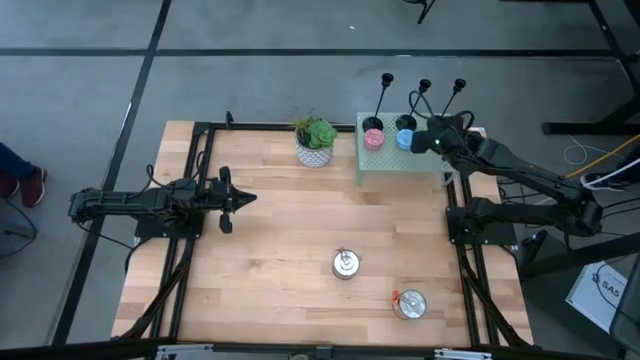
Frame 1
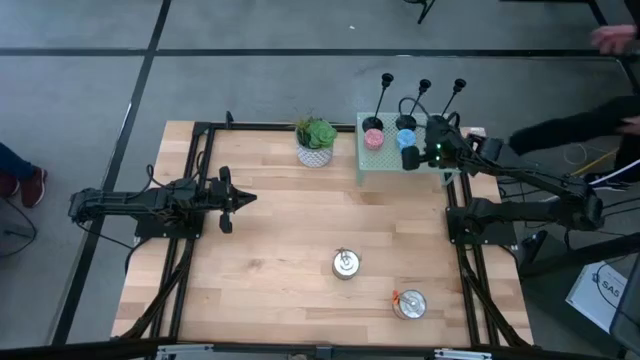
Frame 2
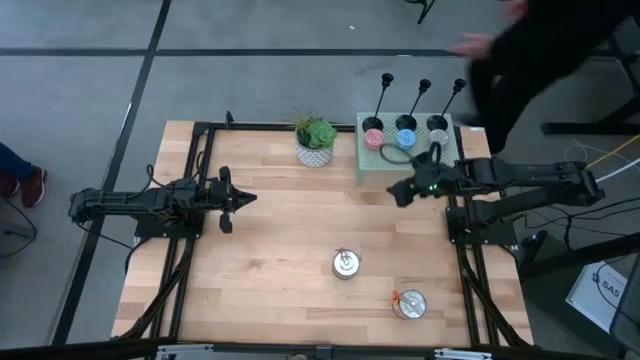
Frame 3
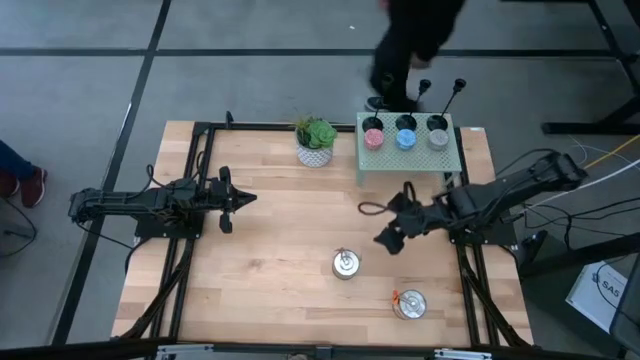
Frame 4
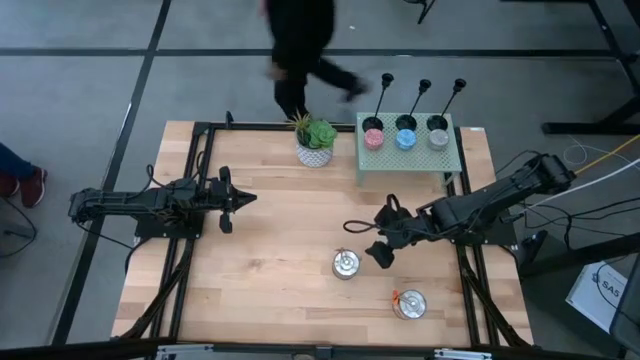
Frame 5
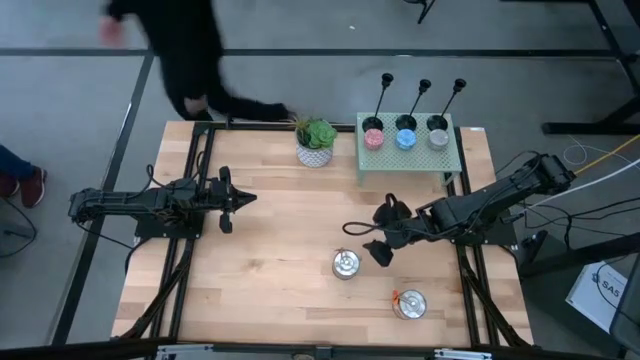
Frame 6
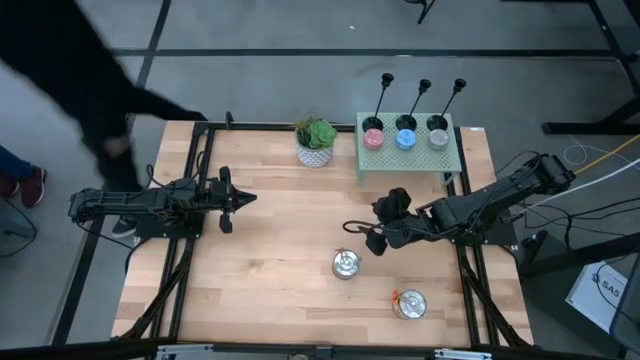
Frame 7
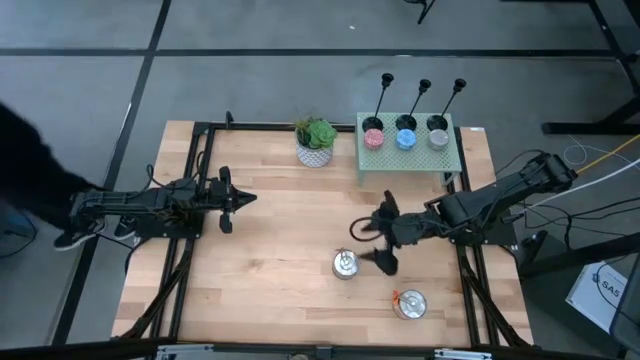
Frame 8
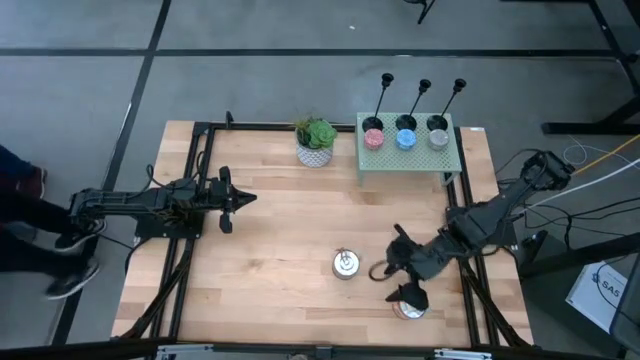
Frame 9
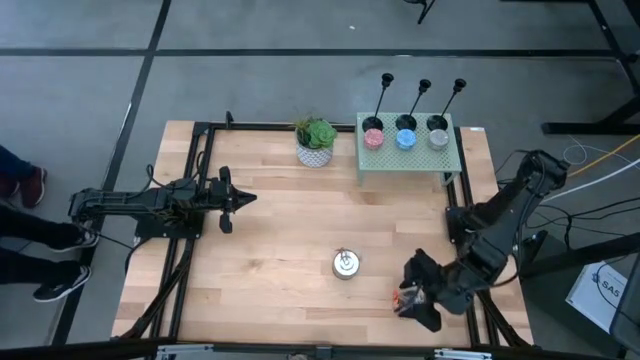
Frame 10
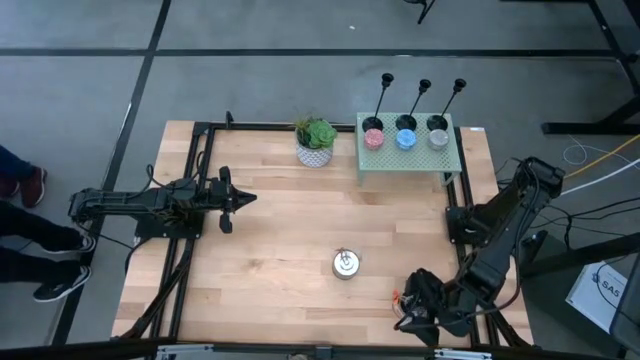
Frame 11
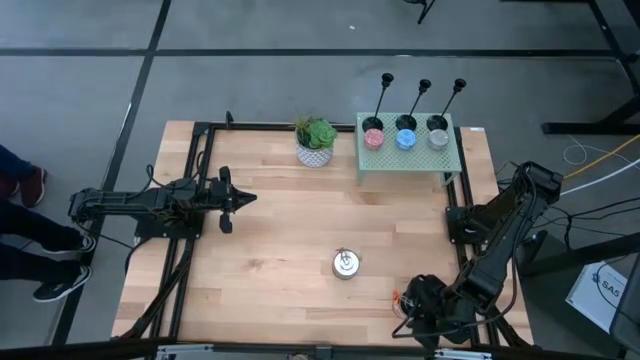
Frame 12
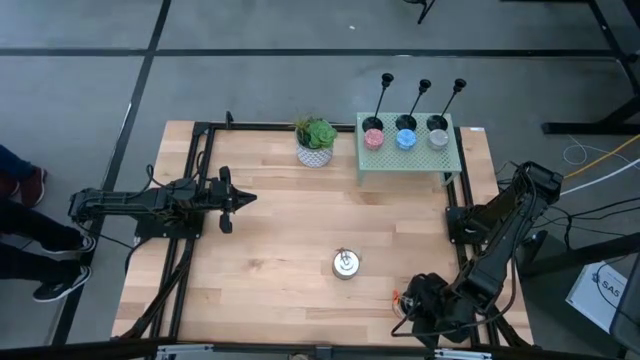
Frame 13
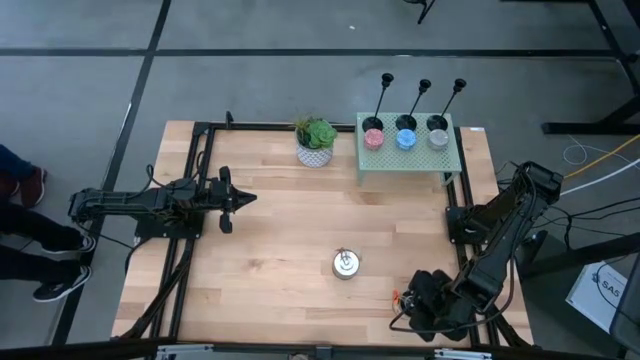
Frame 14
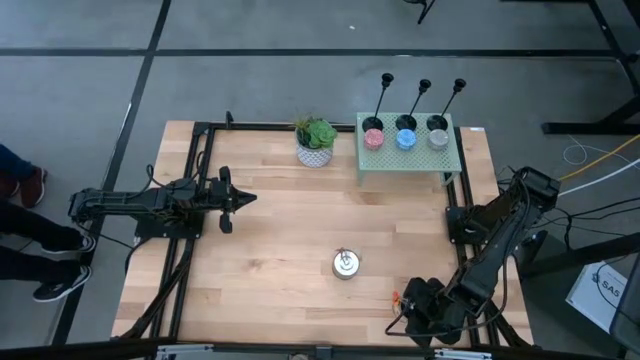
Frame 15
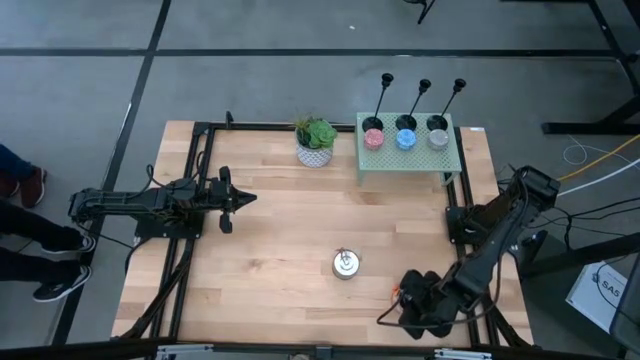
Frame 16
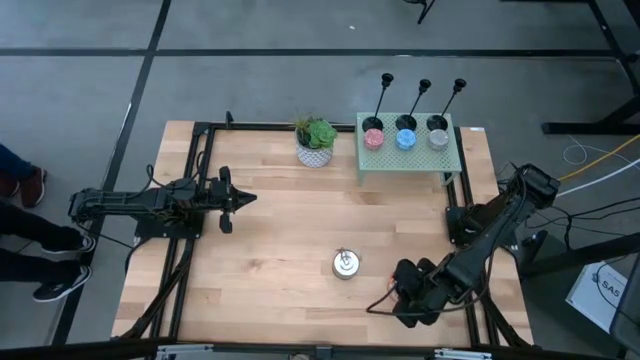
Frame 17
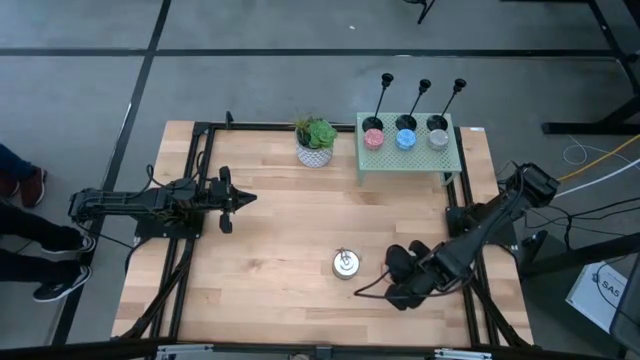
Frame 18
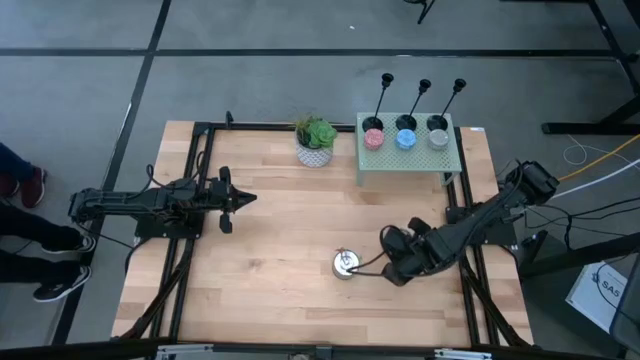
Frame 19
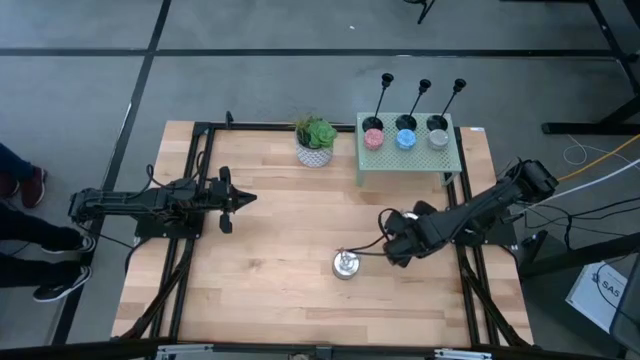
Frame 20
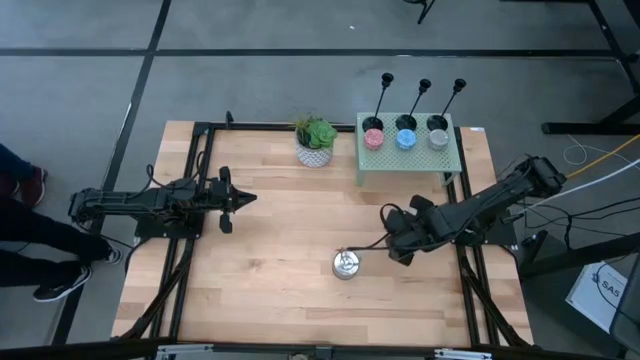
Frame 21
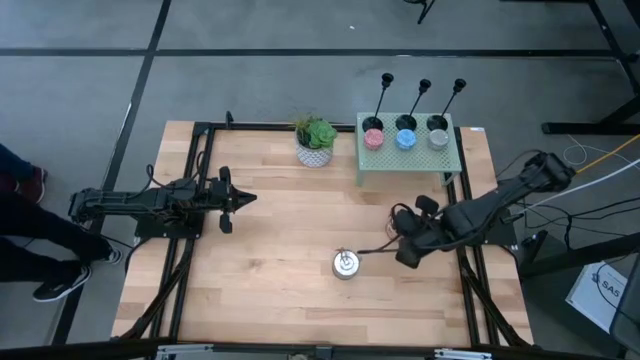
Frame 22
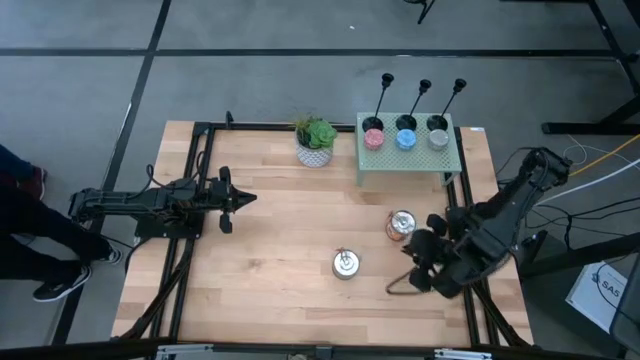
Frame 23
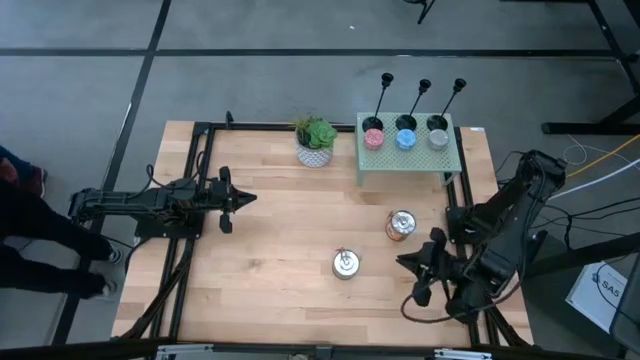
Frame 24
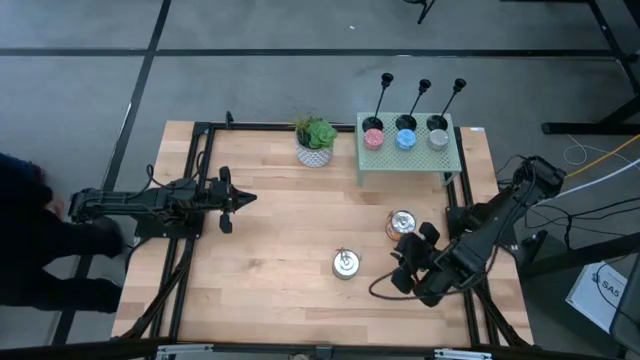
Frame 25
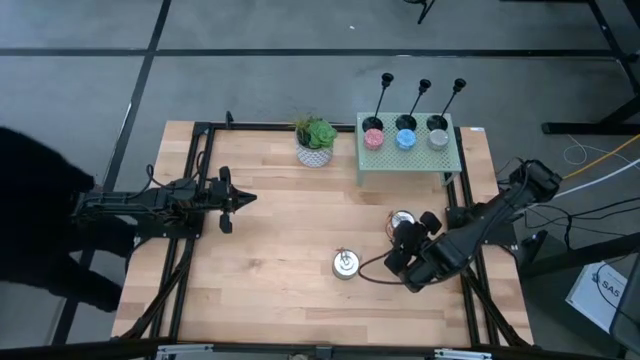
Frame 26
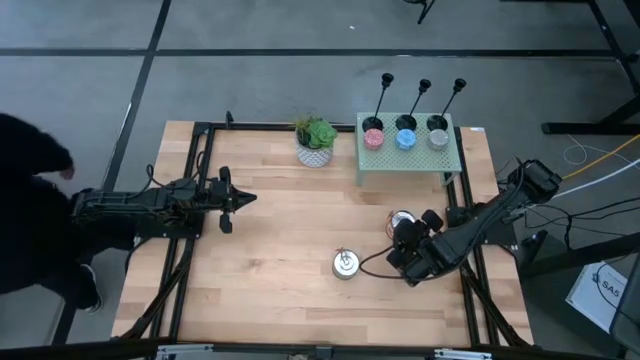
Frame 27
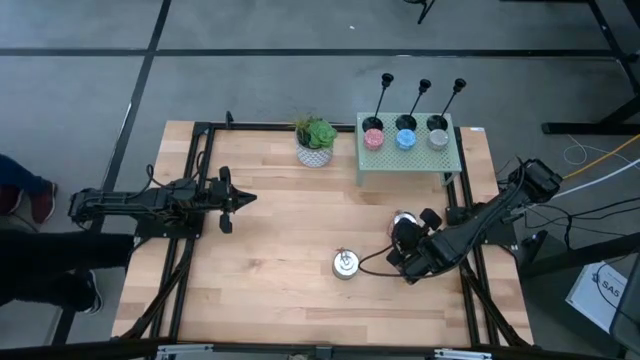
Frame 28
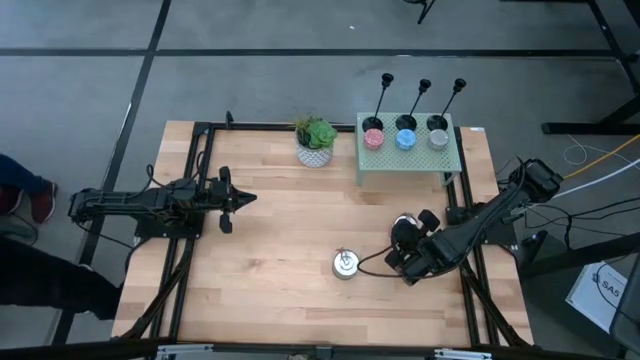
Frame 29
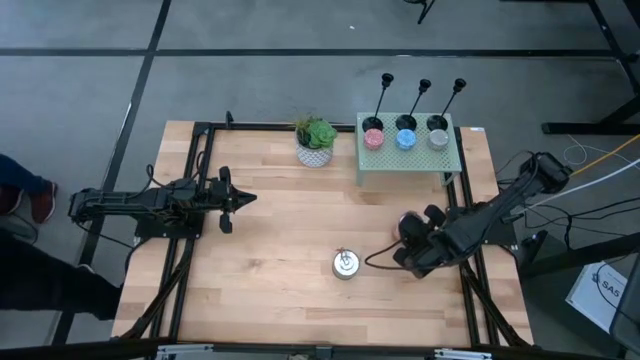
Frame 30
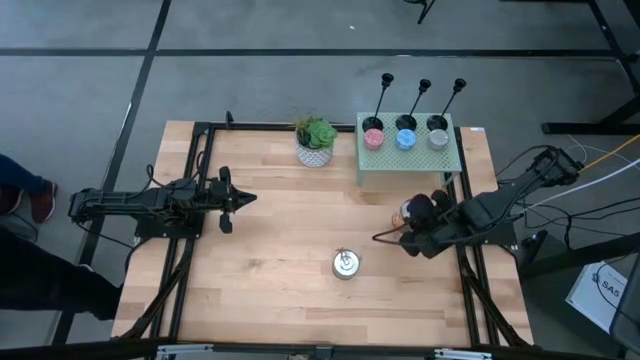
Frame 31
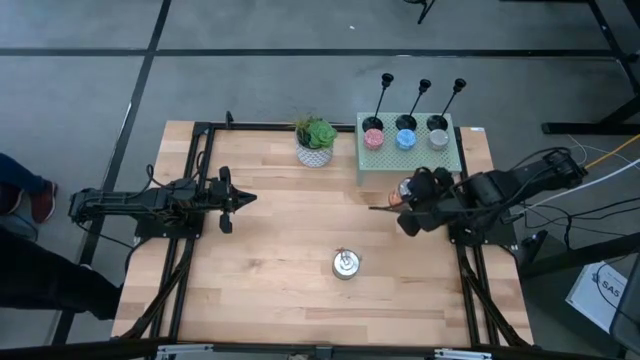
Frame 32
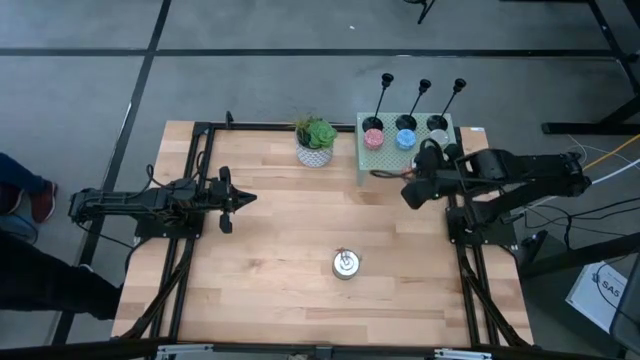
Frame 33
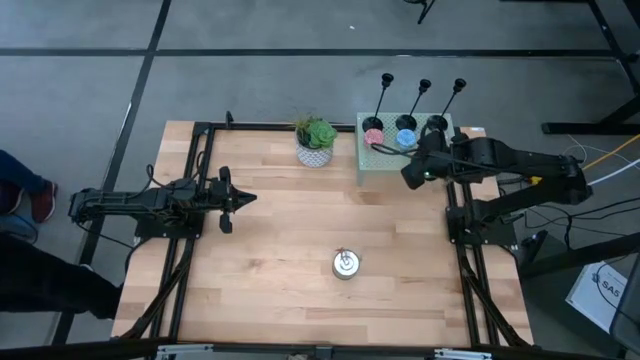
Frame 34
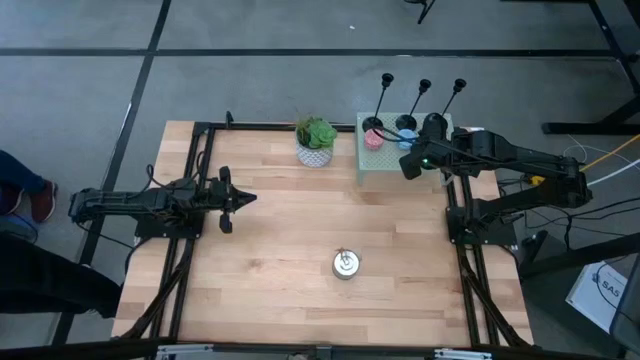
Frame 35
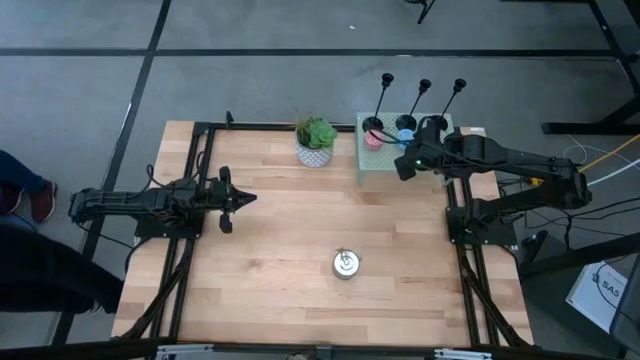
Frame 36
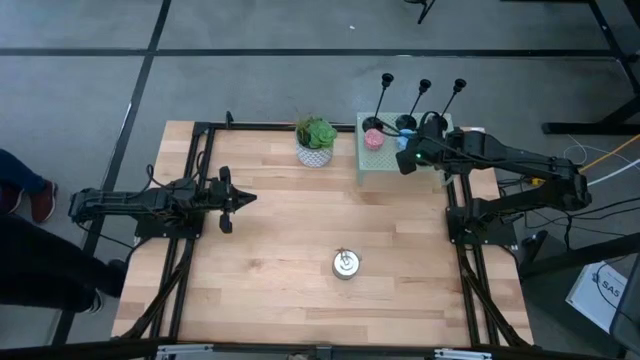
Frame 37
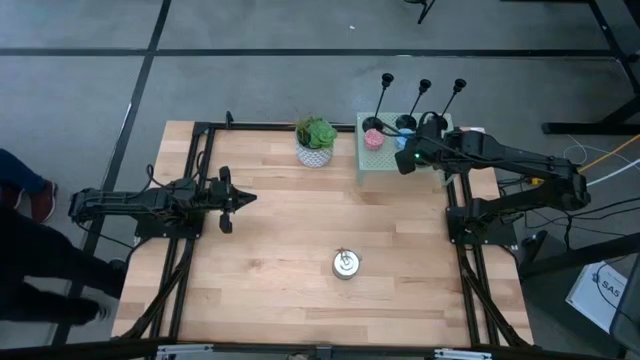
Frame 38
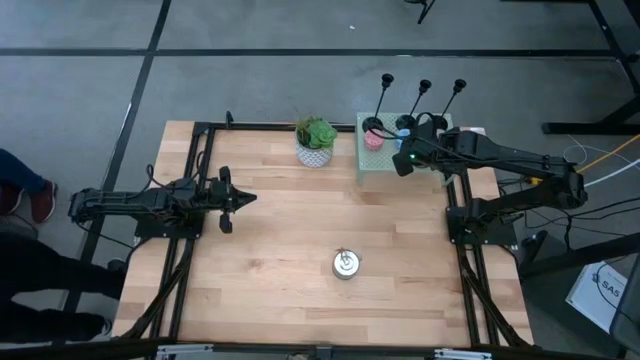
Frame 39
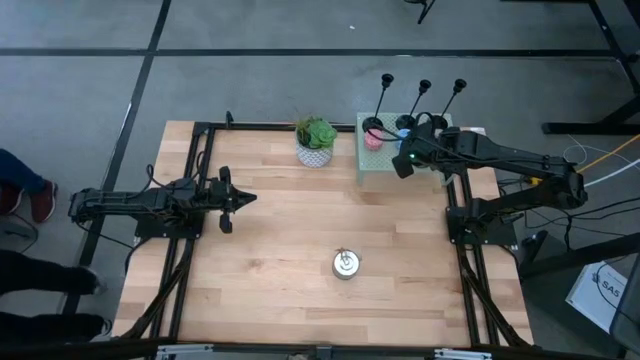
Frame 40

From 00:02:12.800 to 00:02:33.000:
Task: Pick & Place candle stick holders
Put the right silver scented candle can on the shelf
